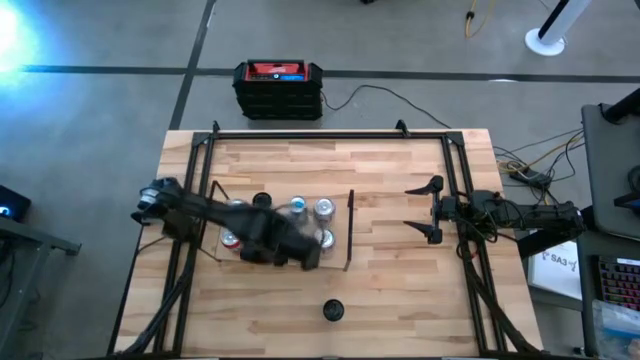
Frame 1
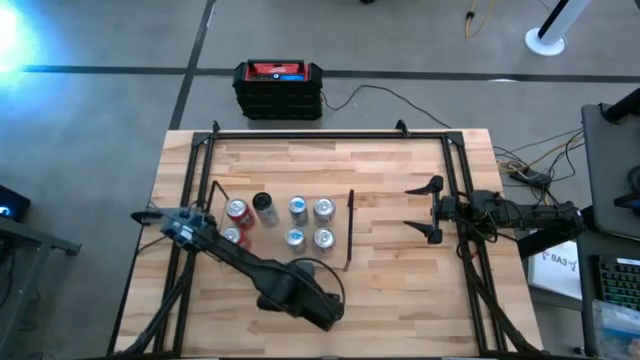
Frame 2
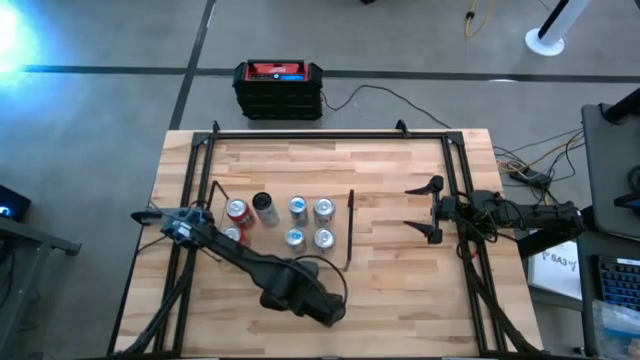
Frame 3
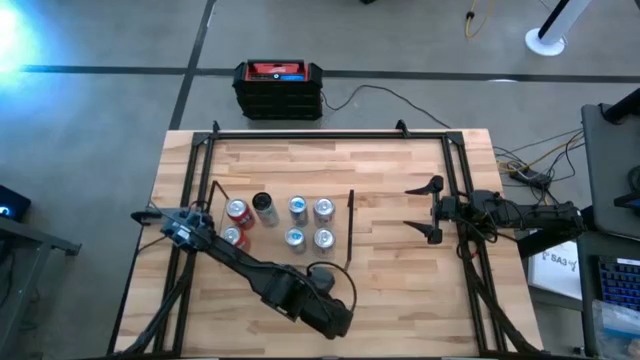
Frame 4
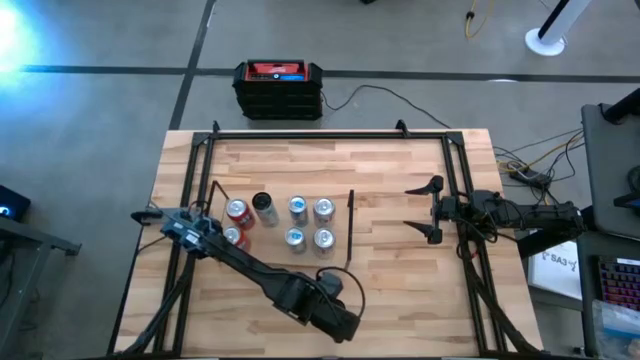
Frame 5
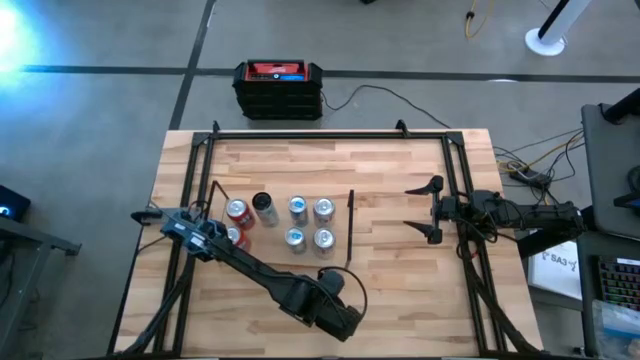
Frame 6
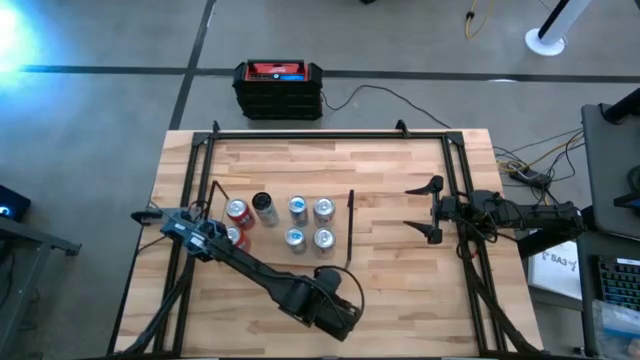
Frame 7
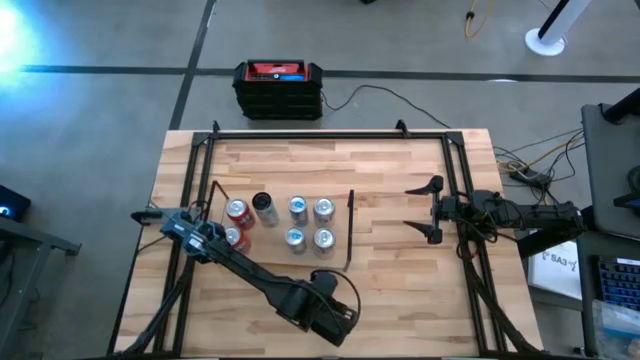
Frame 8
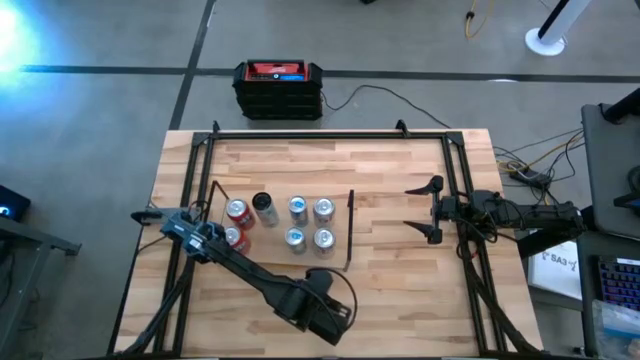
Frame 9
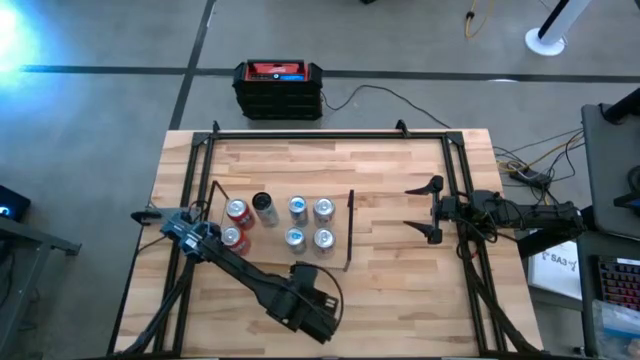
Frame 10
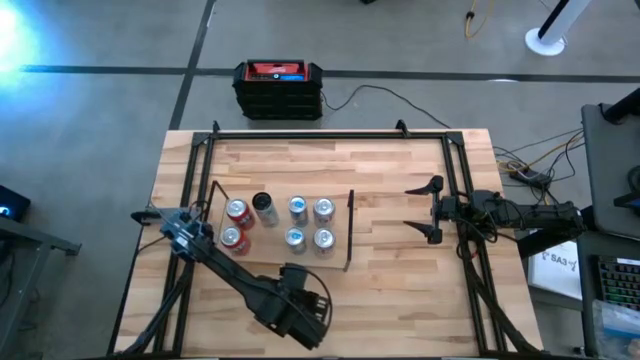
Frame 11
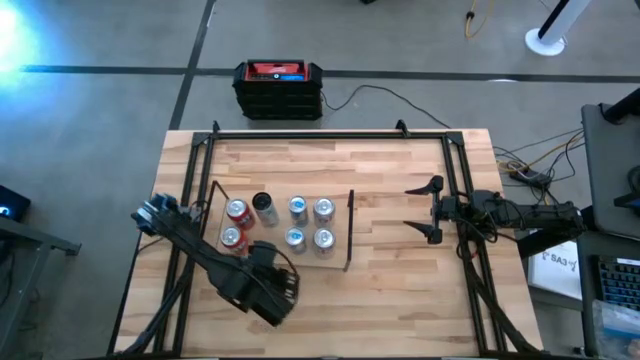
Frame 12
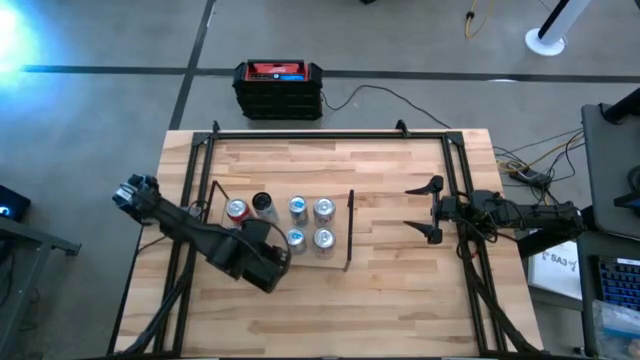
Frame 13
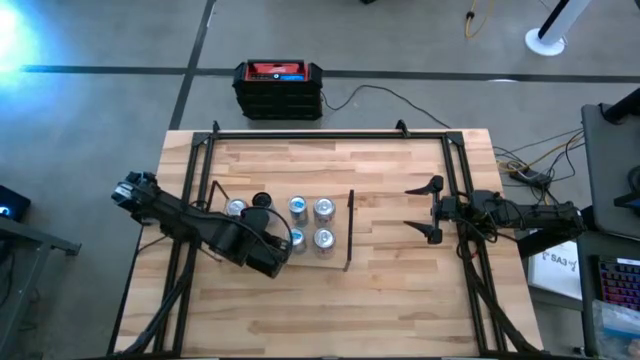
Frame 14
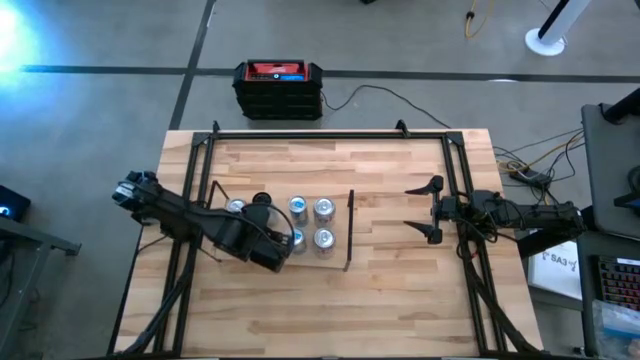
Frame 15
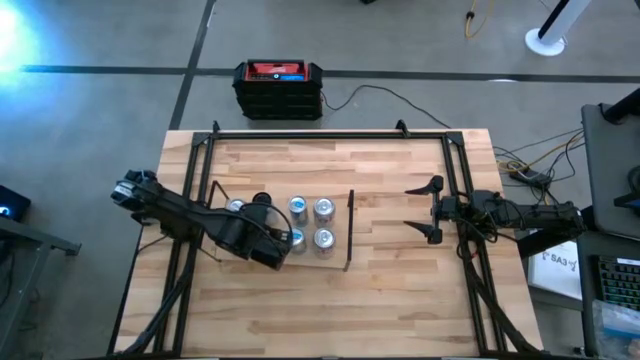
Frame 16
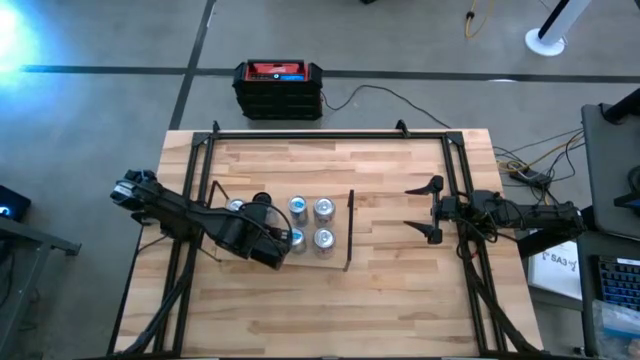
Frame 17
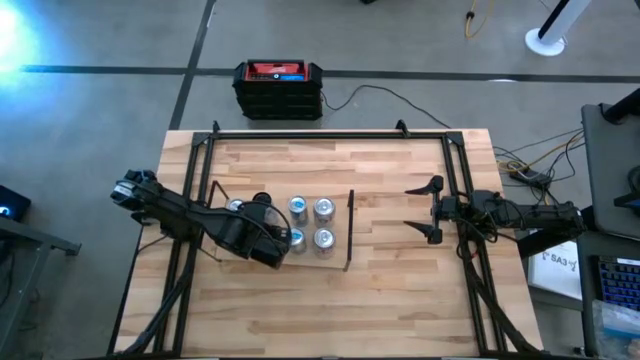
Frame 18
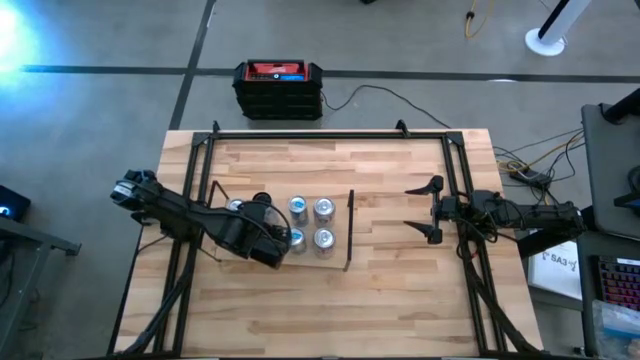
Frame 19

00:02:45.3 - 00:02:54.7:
Task: Place canned beverage on shelf
Put the white pink soda can on the shelf aligned with the other white pink soda can

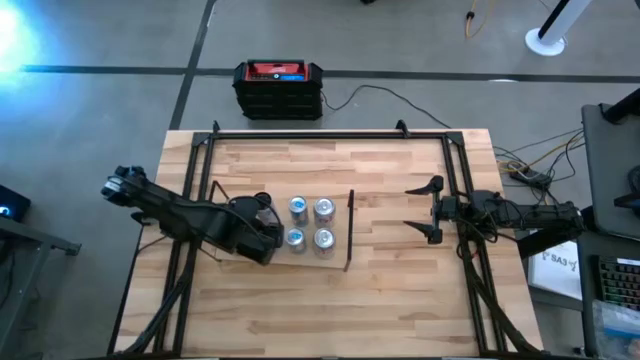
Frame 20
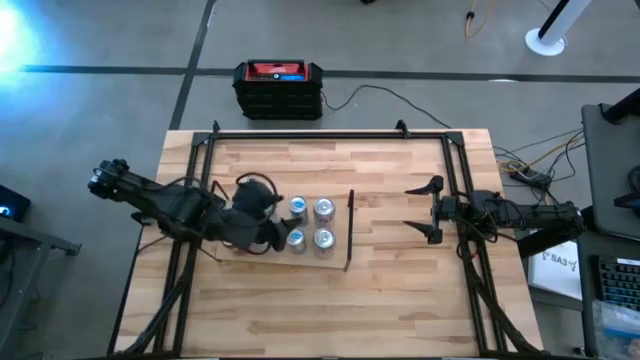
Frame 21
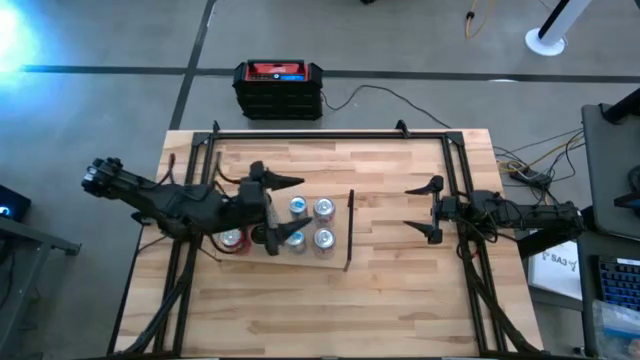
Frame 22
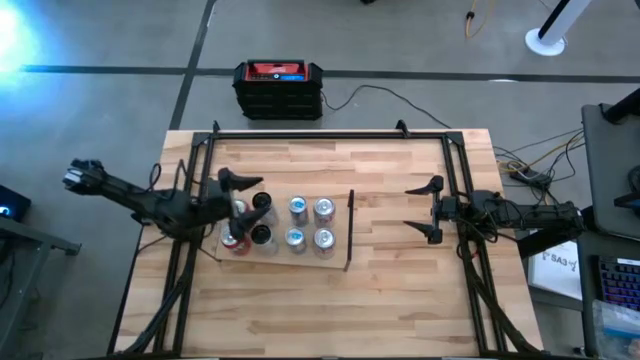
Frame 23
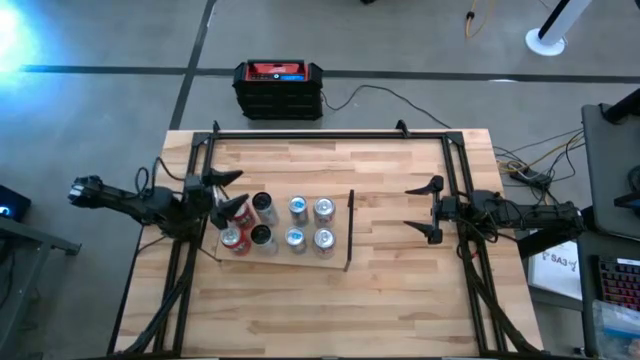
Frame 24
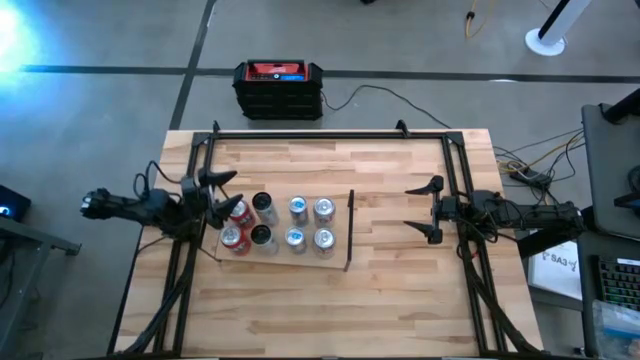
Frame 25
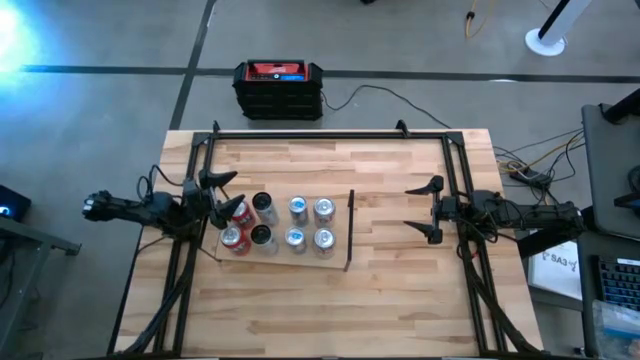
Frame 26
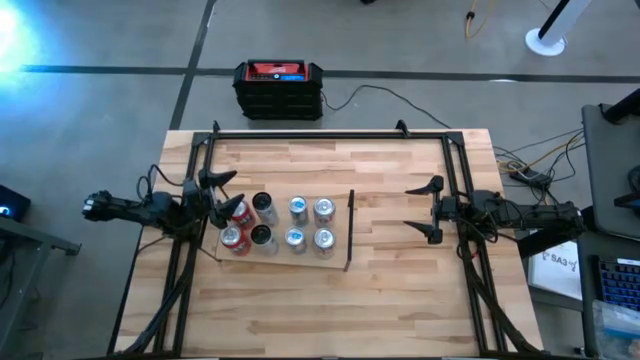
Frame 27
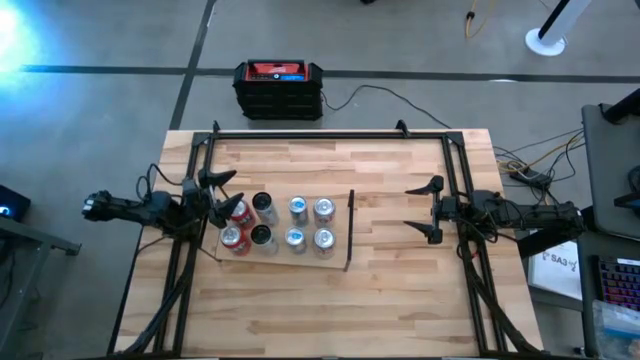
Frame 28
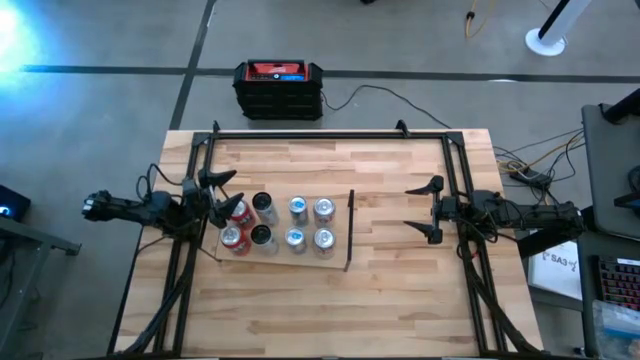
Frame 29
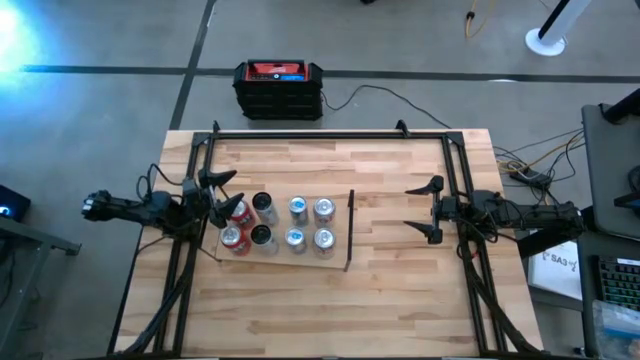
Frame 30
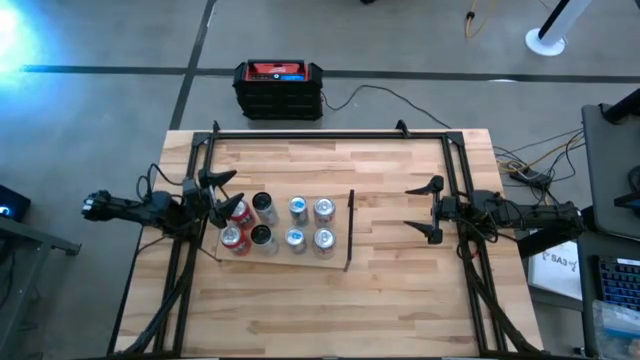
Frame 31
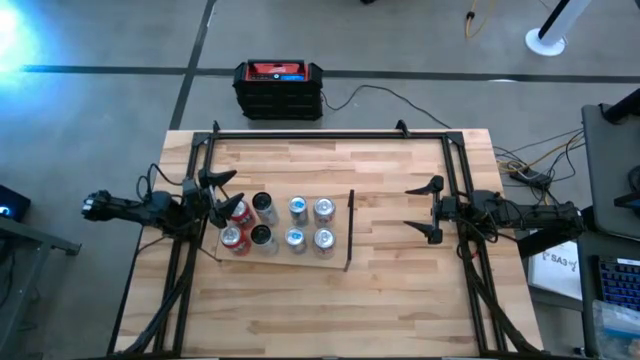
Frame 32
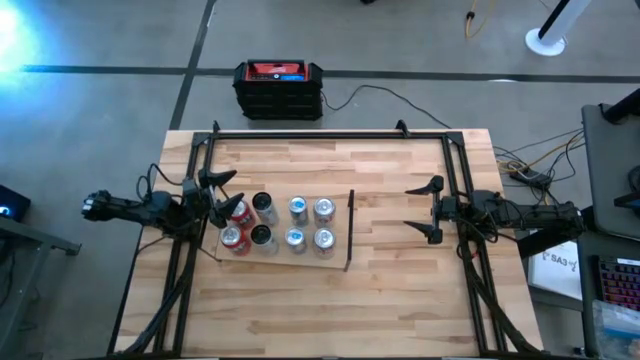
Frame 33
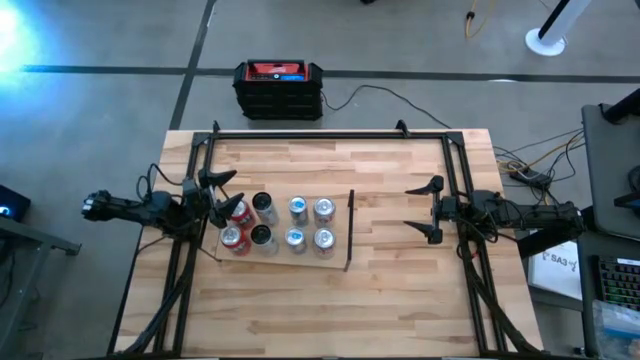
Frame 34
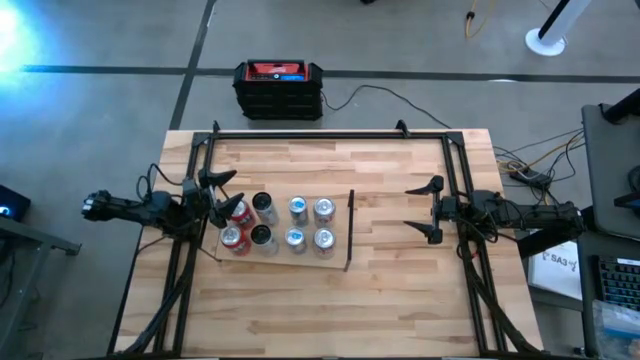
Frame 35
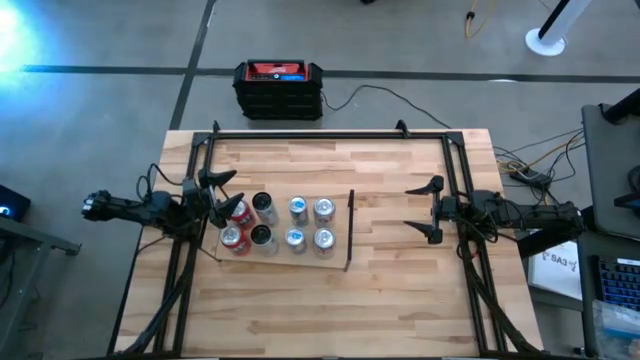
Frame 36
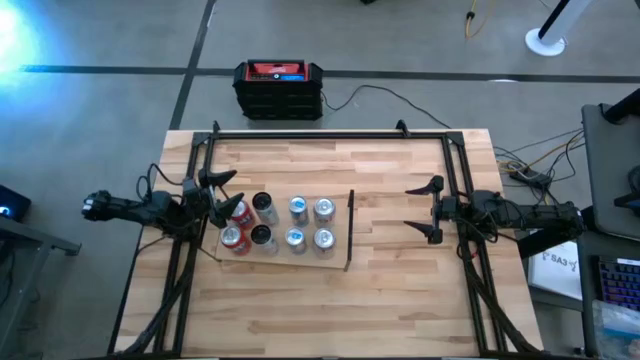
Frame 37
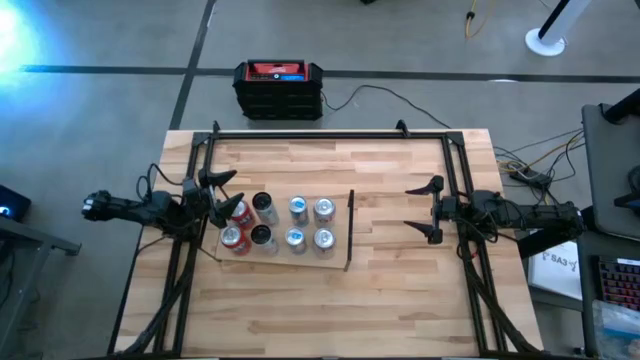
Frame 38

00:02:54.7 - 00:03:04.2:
Return to Home Position

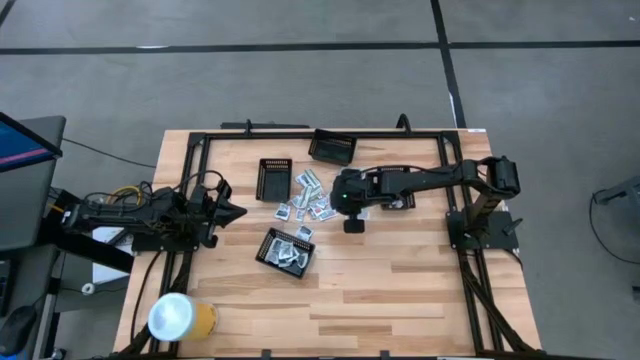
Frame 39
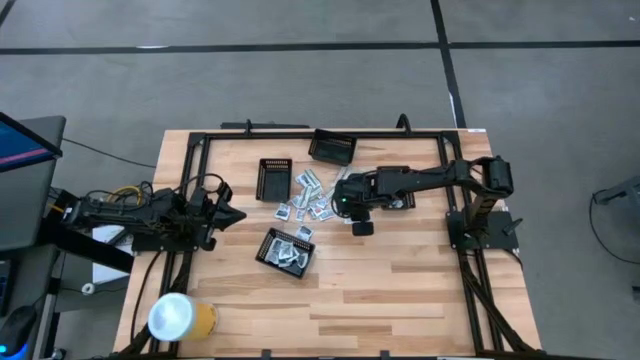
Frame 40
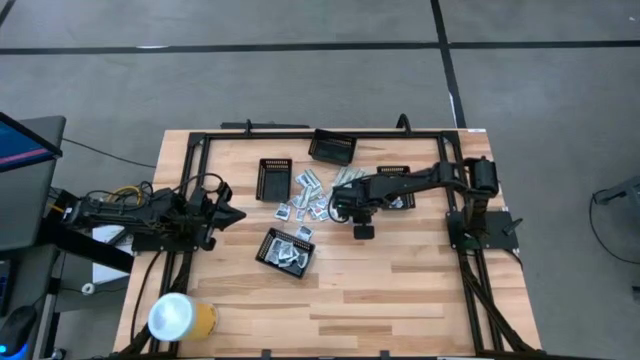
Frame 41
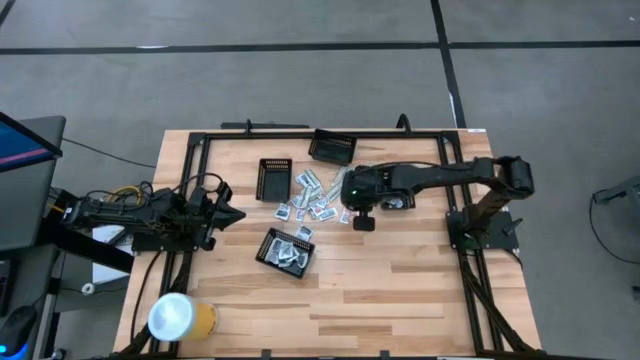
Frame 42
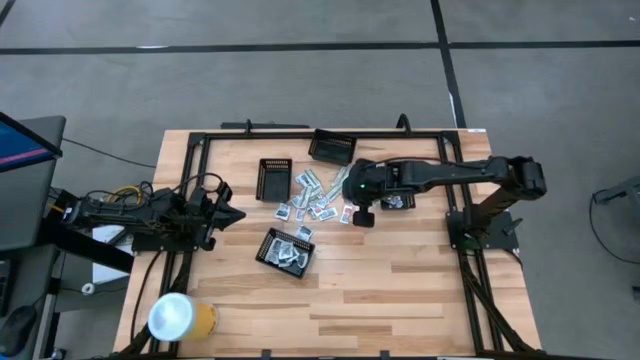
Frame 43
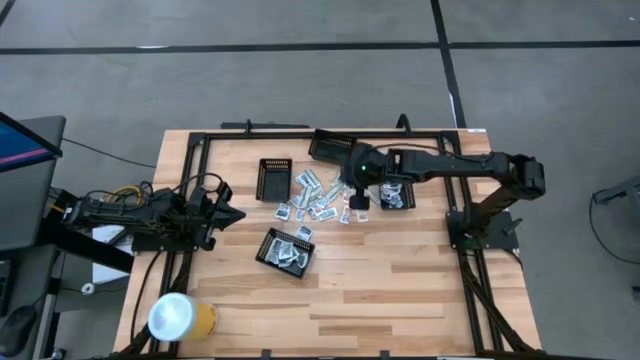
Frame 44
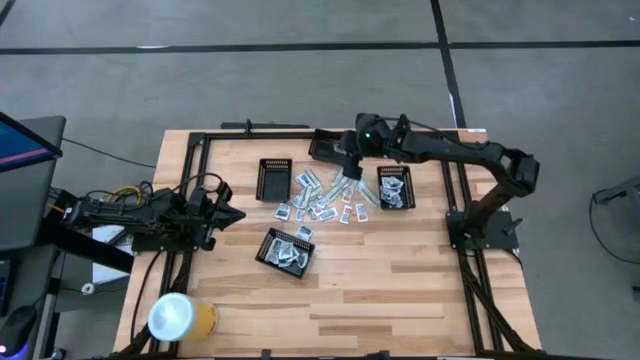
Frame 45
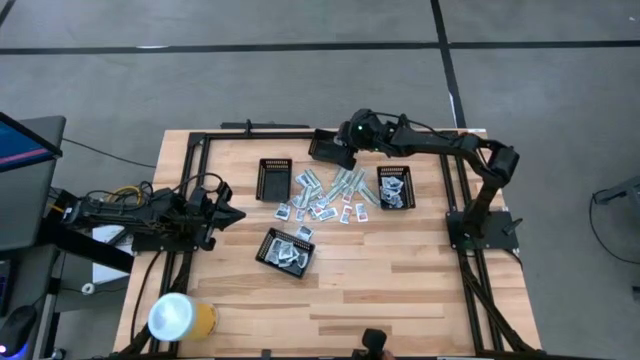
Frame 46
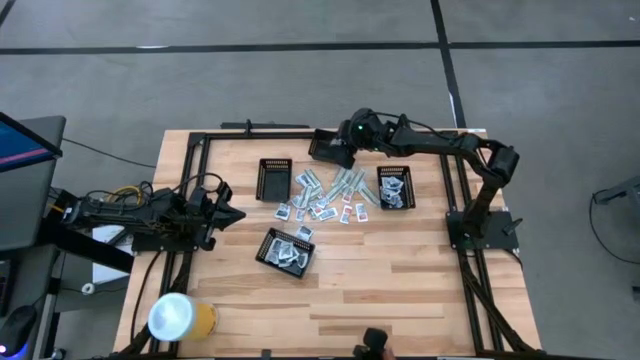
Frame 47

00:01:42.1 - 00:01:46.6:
Task: Pick & Place First Aid Supplies
Put the orange ointment pack into the top black bin
